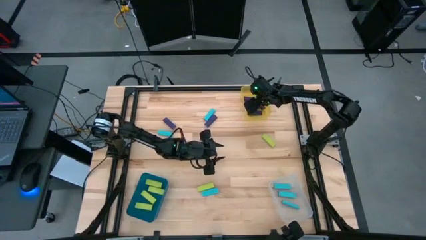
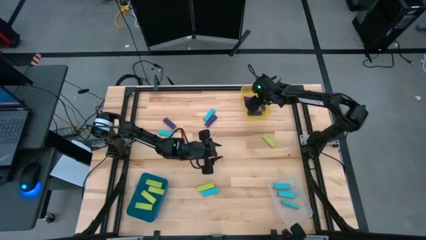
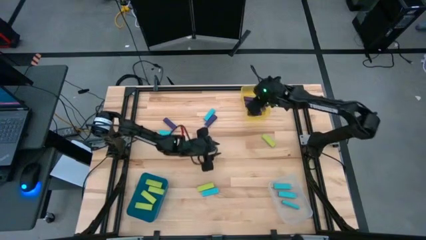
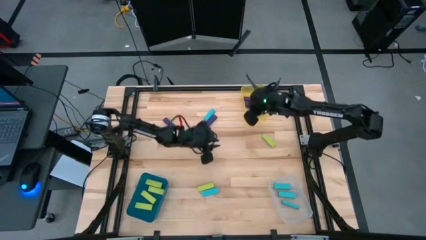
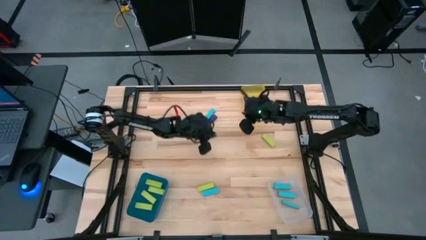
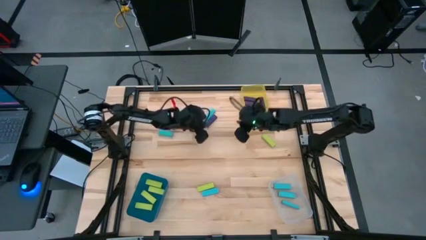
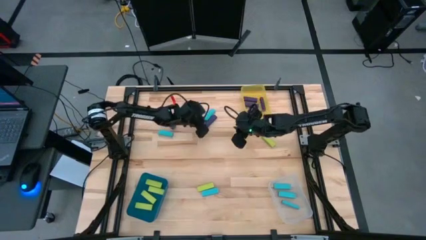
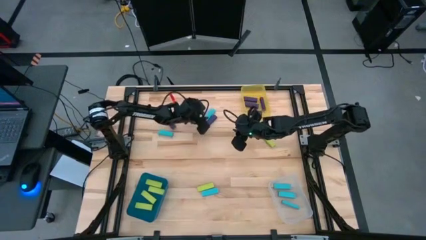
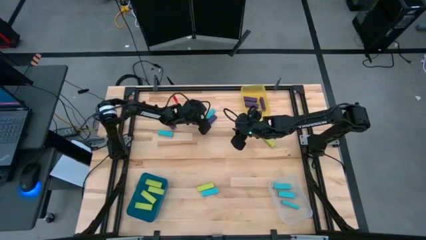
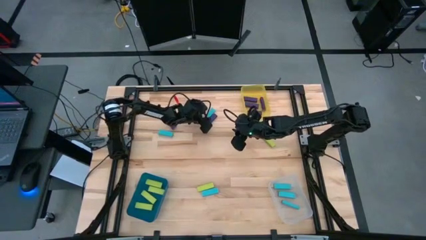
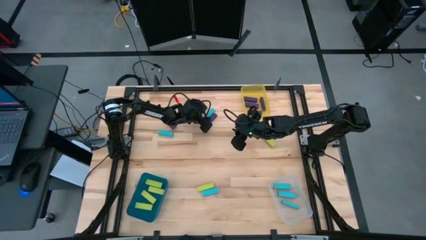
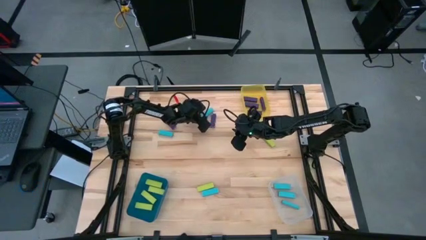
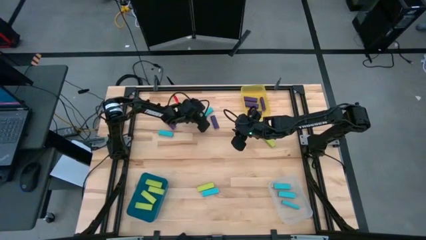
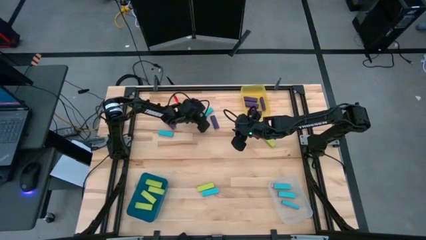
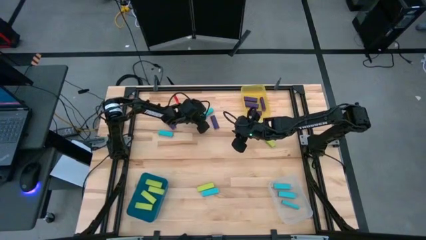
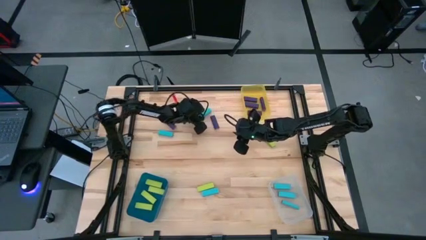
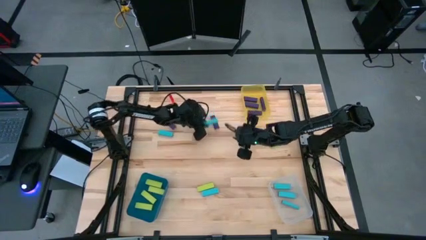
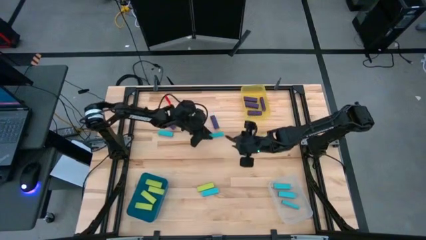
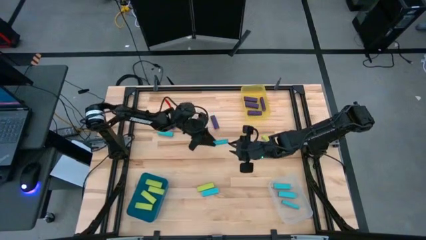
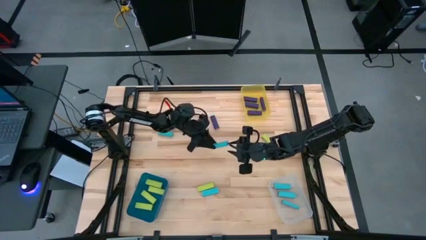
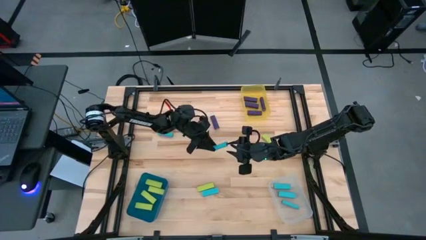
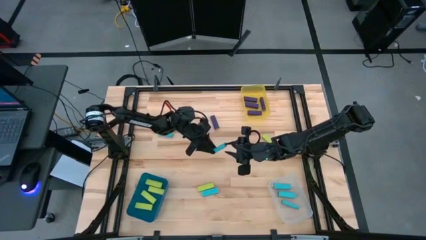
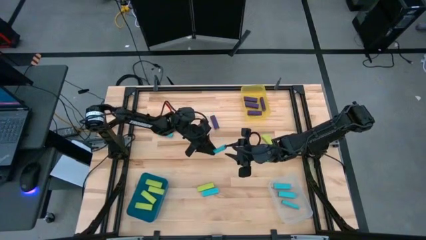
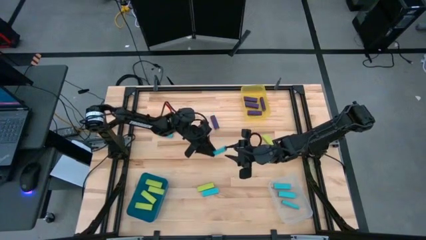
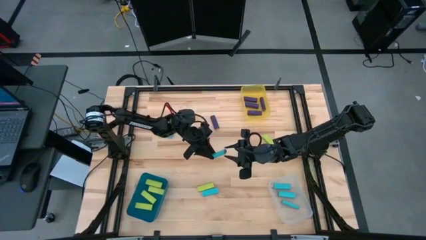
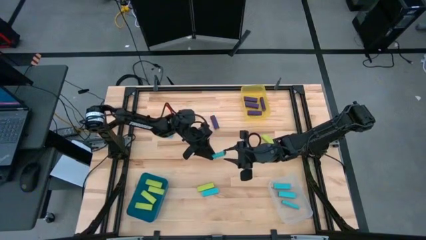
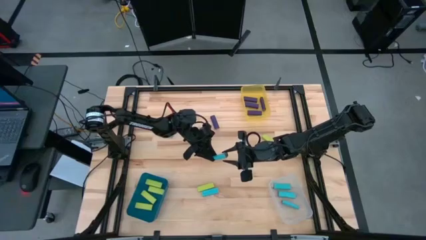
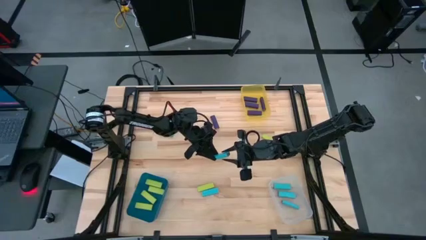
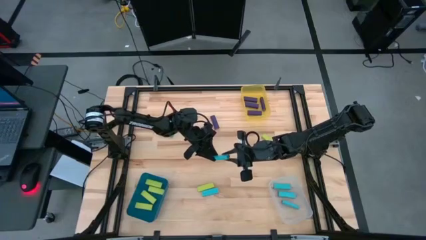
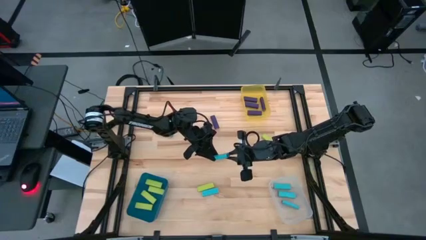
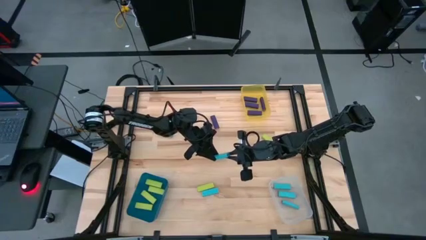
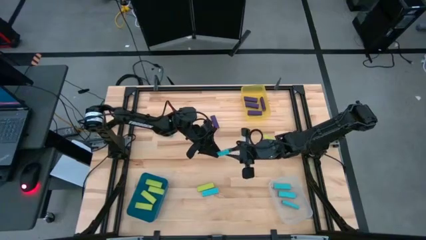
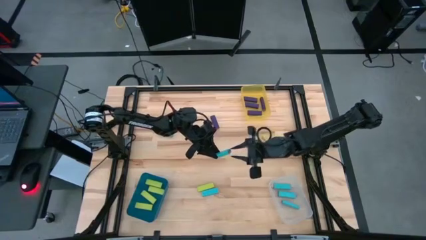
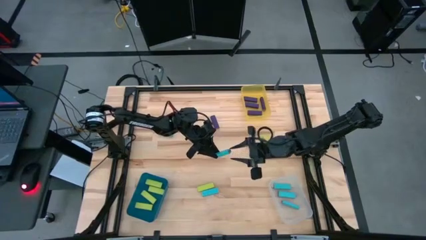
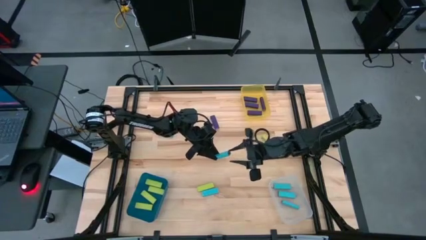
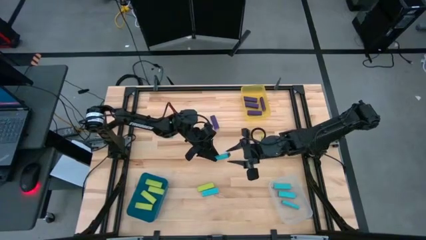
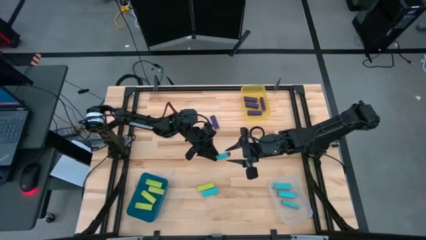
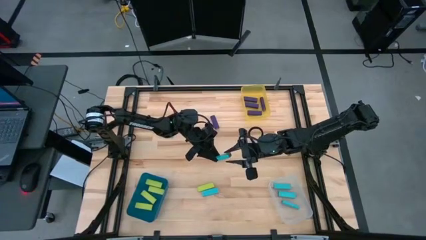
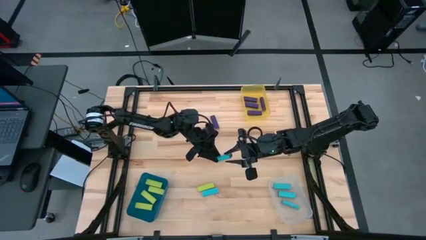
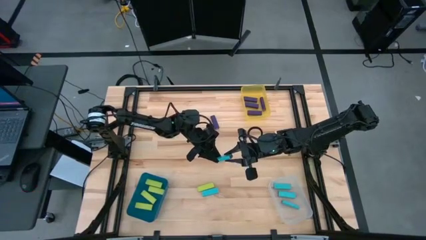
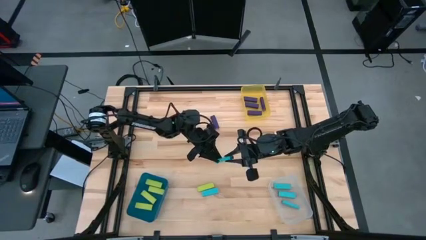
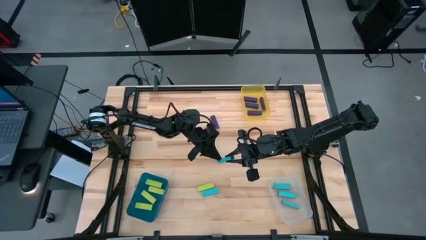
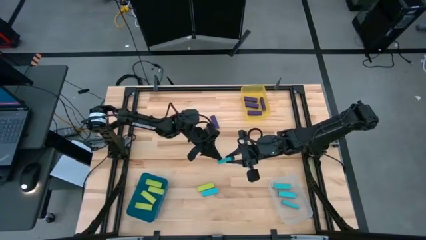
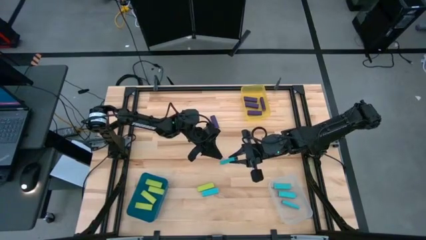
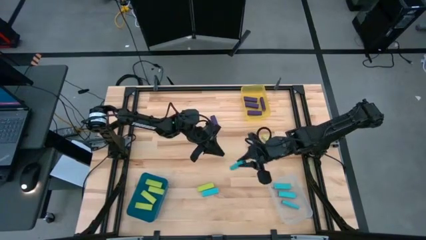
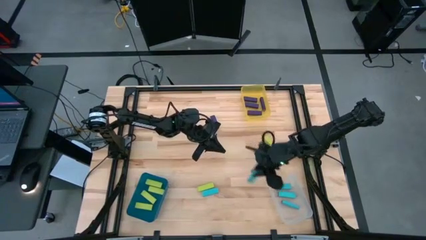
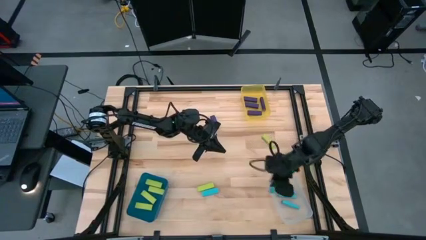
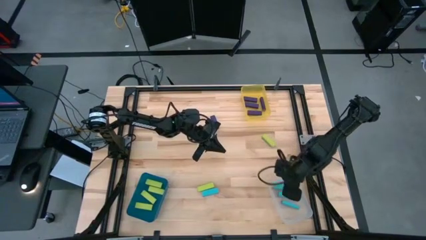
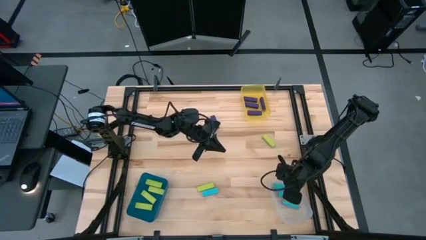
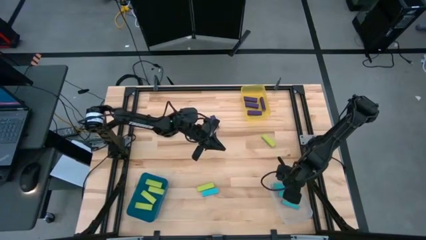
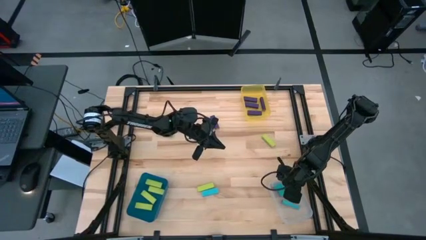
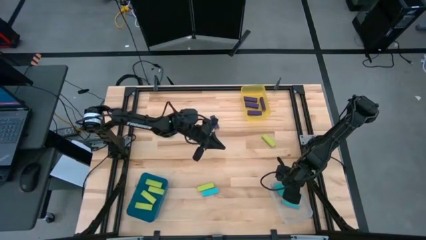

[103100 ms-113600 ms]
Task: Sort blocks
Put the light blue block into the transparent bin

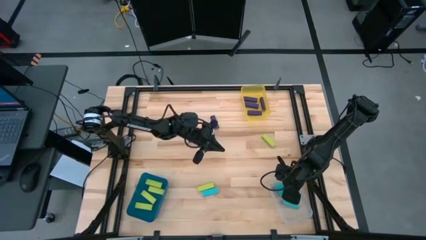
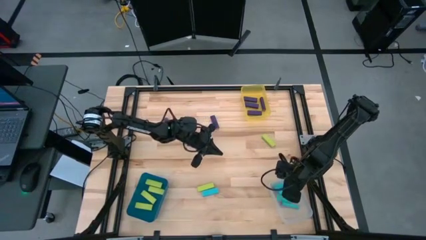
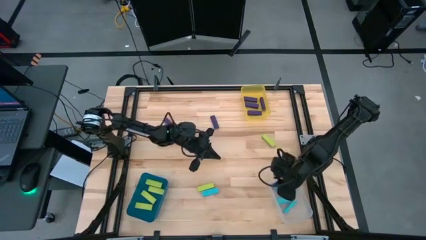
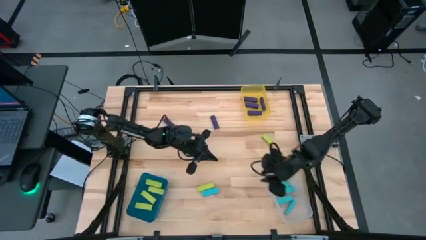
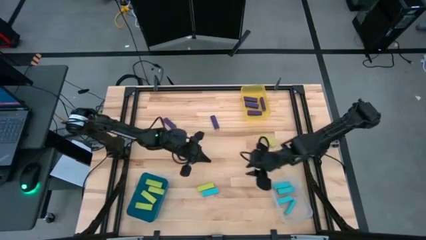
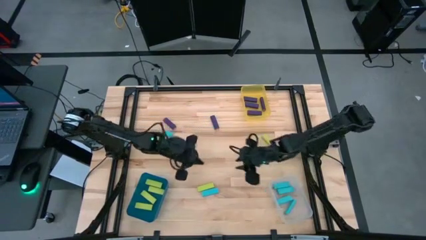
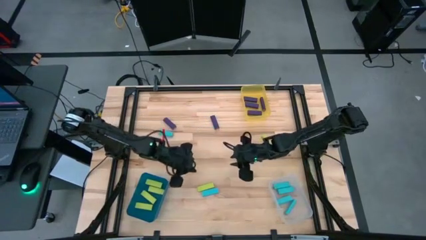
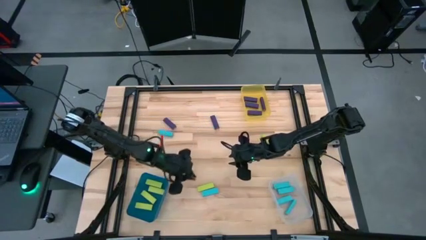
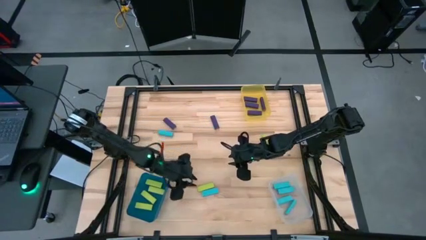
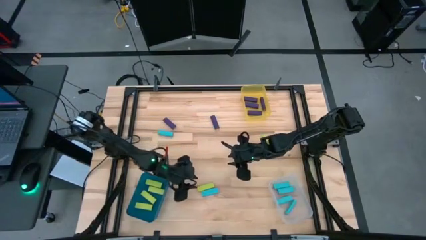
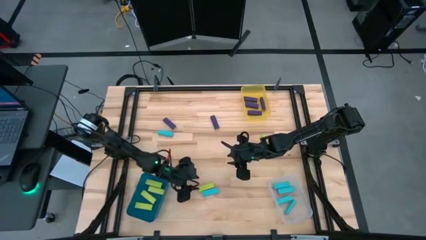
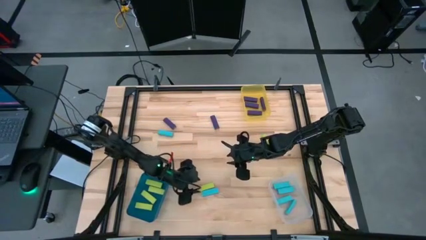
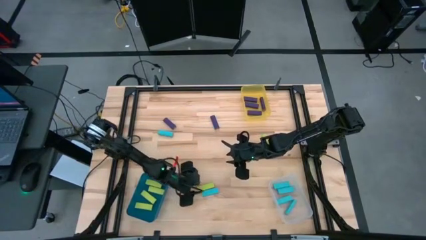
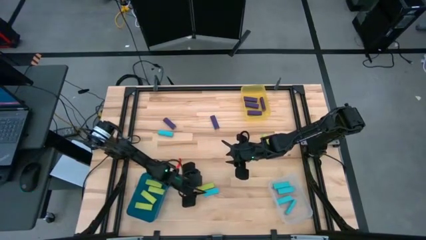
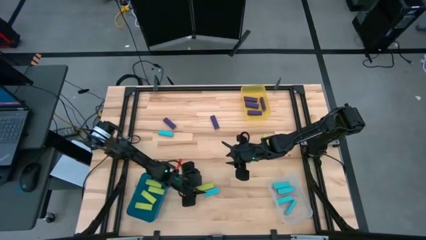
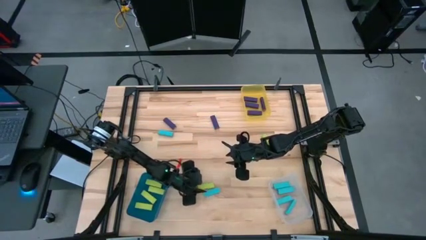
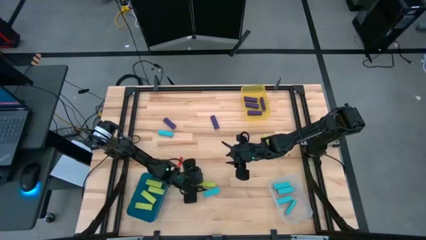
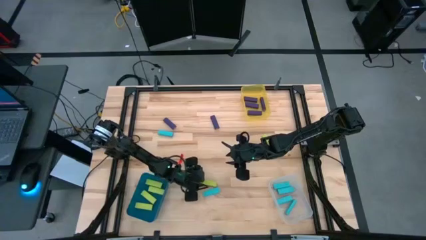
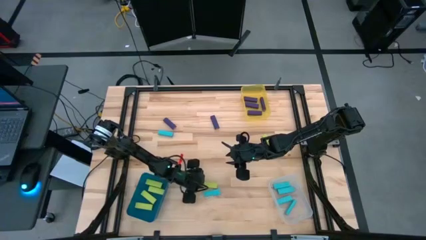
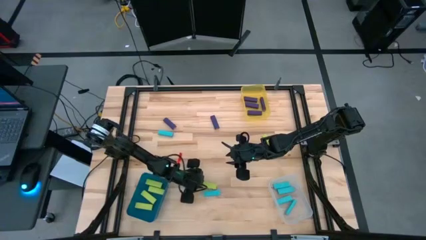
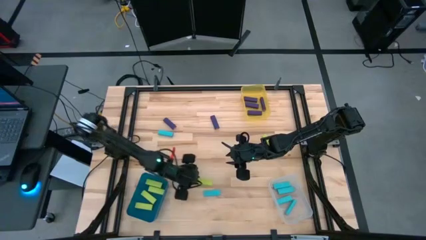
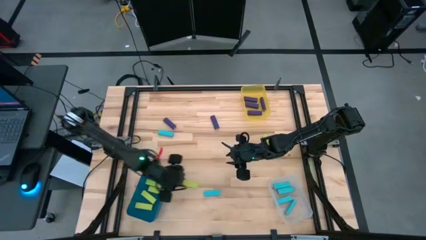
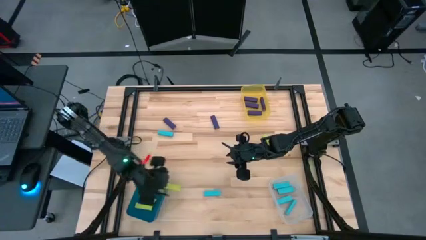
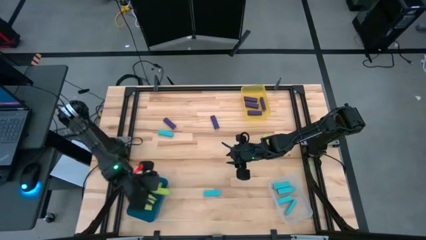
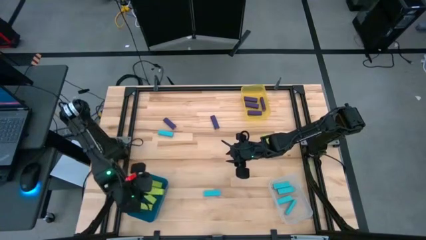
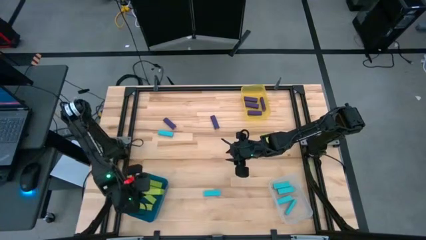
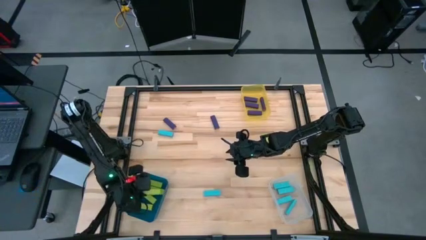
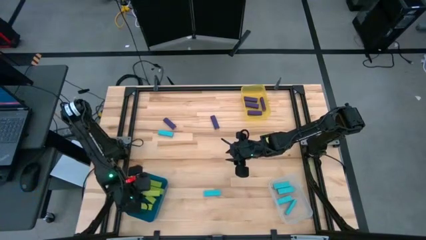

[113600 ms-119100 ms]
Put the green block into the blue bin

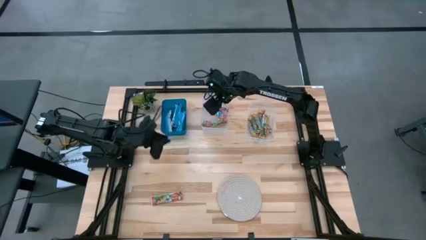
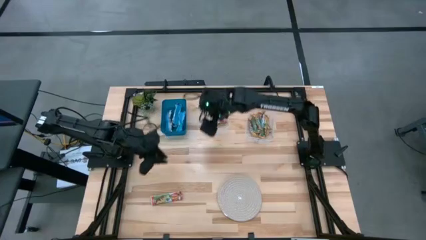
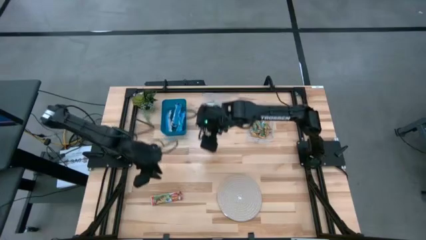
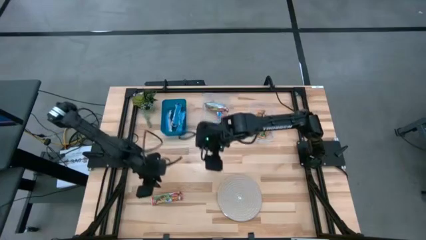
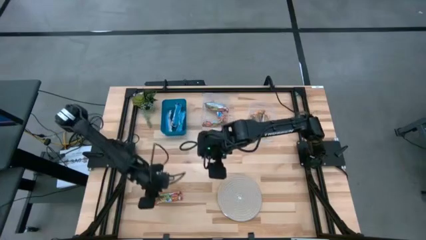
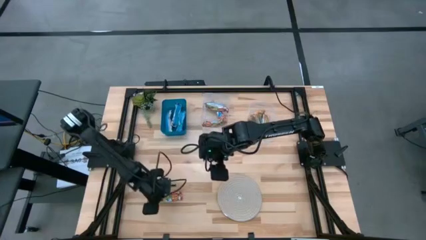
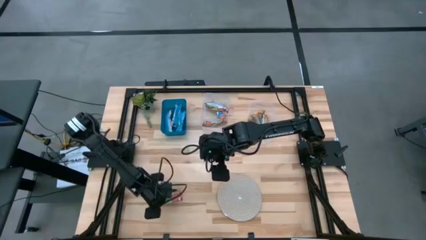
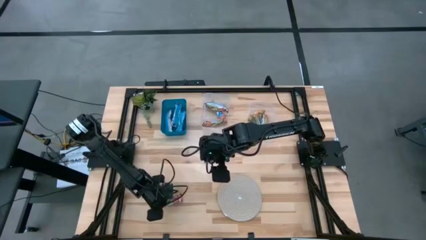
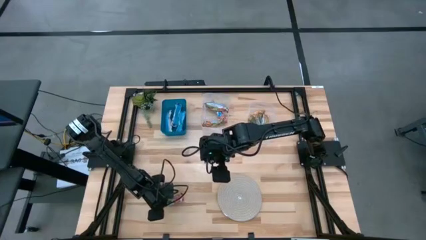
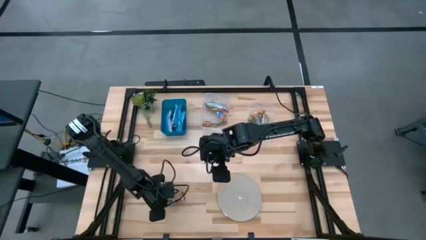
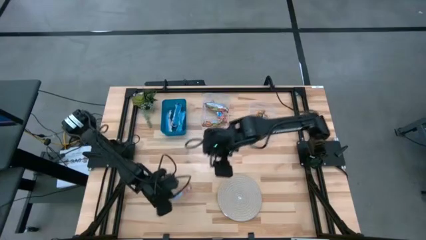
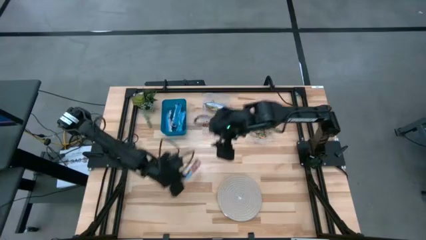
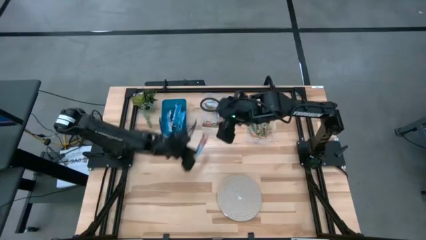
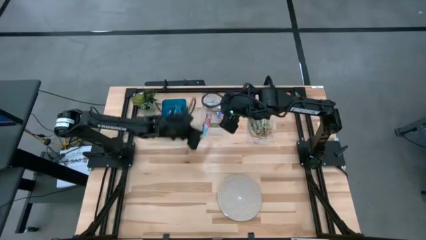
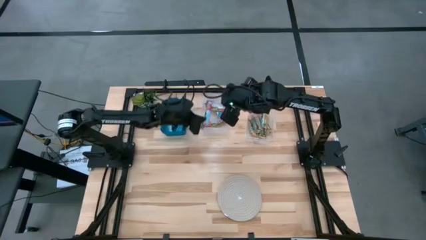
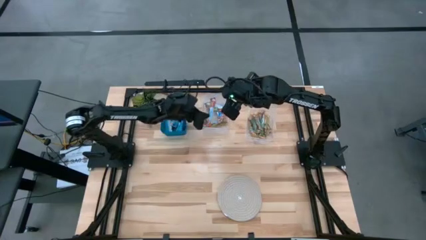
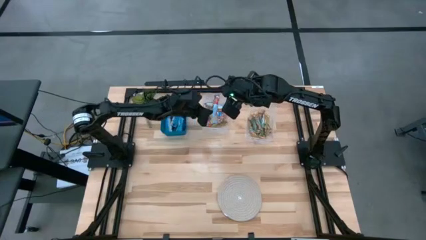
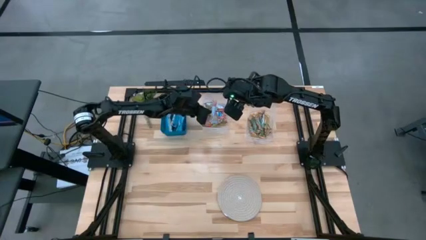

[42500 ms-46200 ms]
Task: Pick and place Granola Bars by type
Put the red granola bar into the left transparent bin
